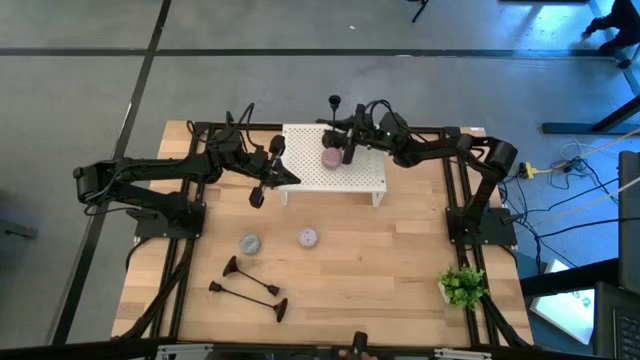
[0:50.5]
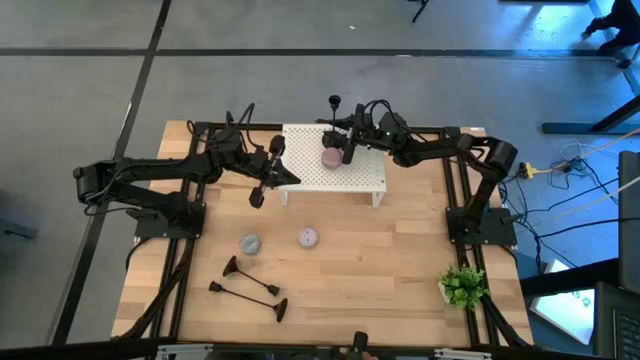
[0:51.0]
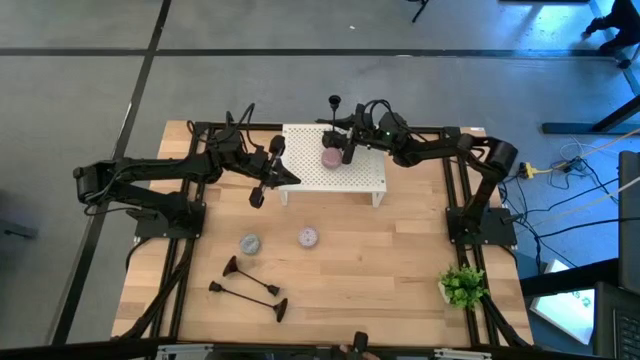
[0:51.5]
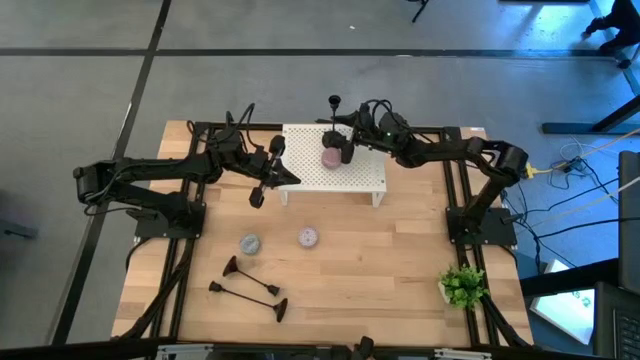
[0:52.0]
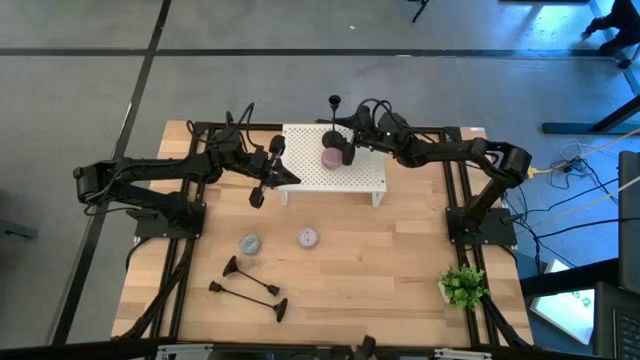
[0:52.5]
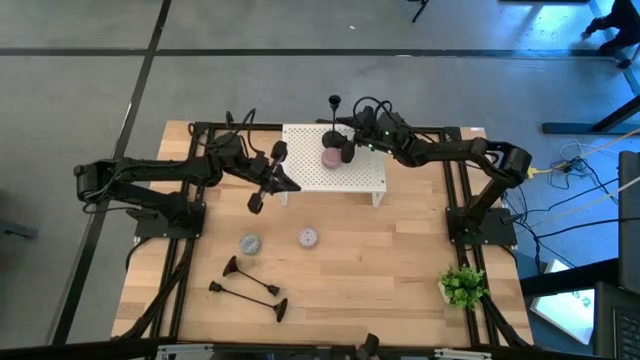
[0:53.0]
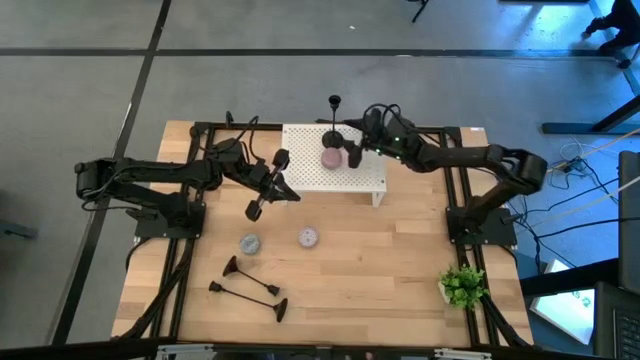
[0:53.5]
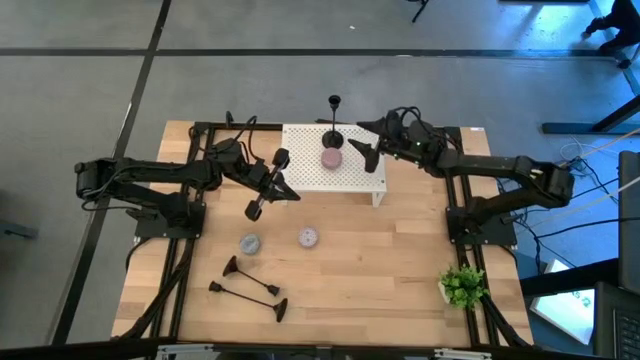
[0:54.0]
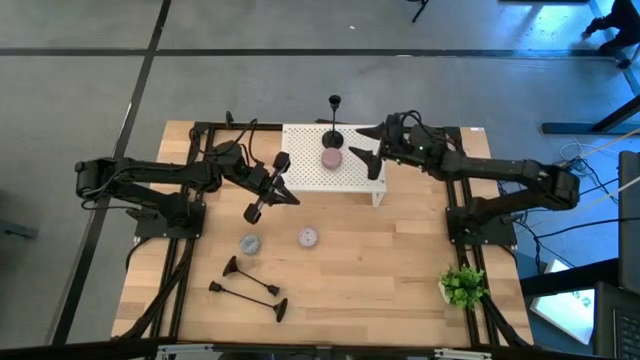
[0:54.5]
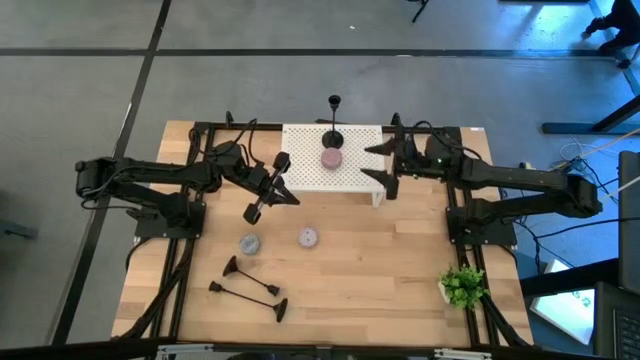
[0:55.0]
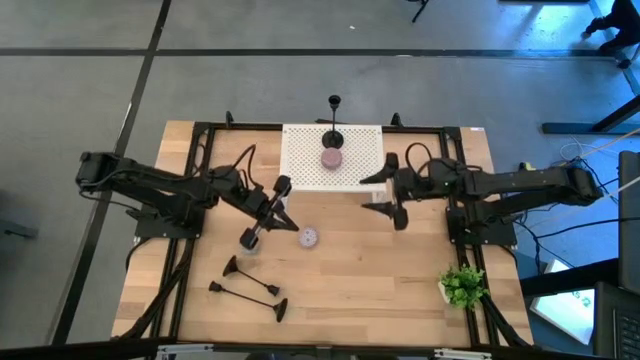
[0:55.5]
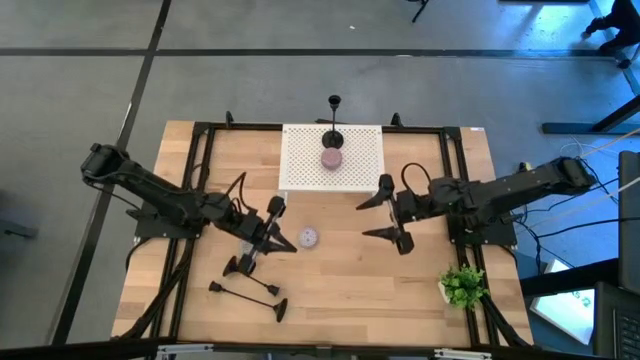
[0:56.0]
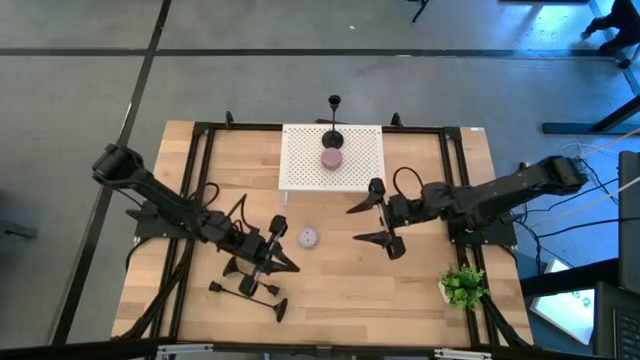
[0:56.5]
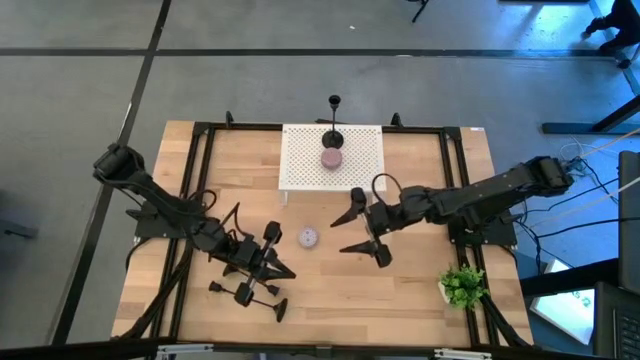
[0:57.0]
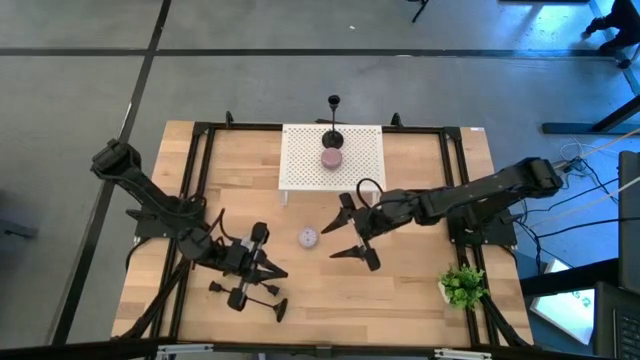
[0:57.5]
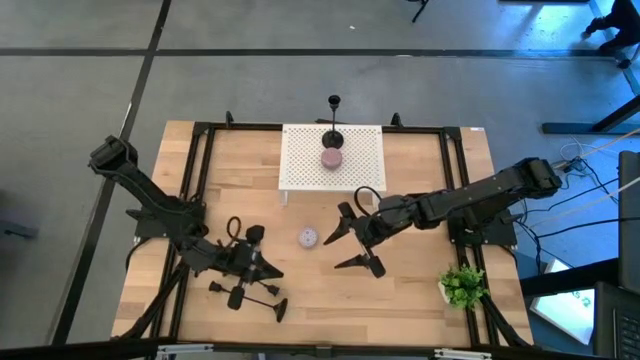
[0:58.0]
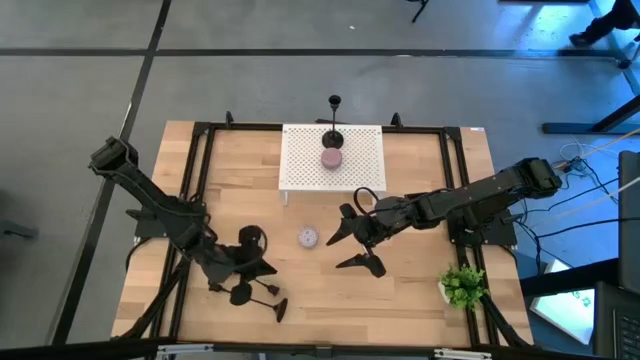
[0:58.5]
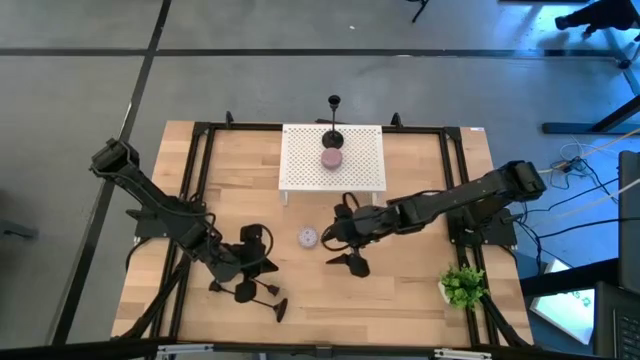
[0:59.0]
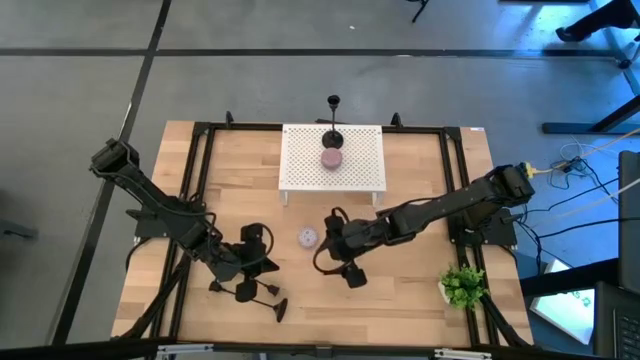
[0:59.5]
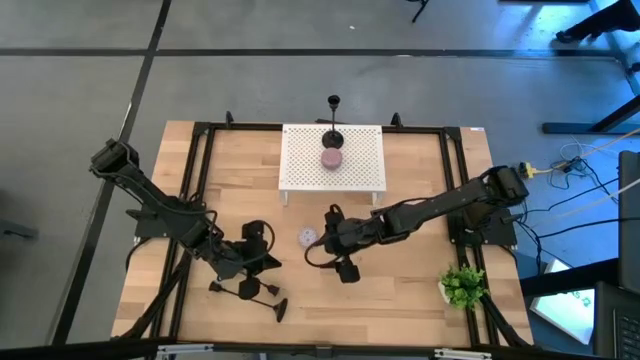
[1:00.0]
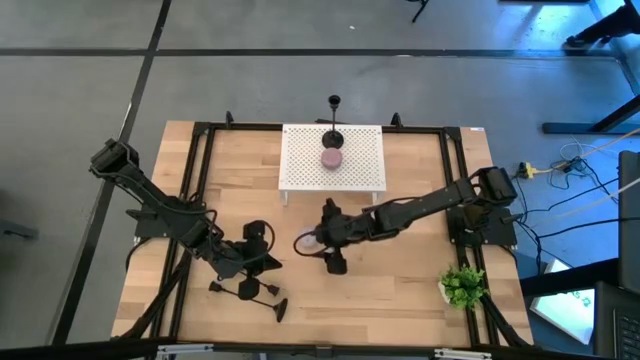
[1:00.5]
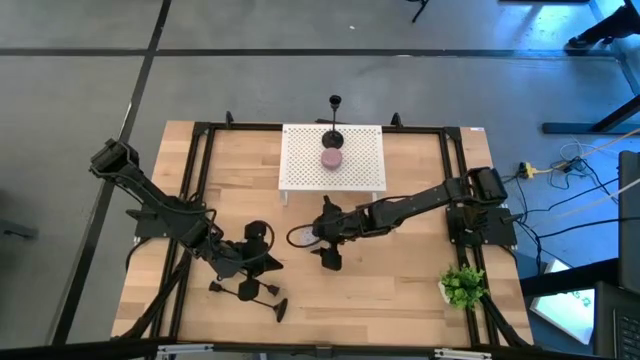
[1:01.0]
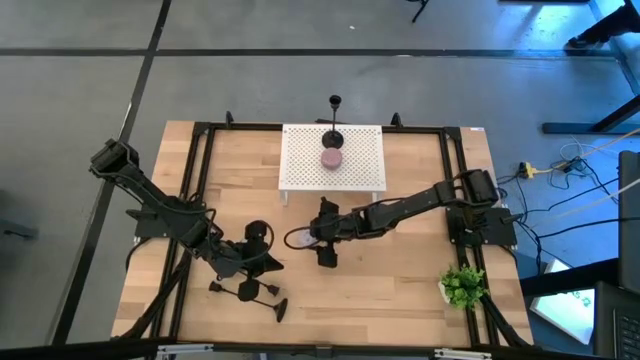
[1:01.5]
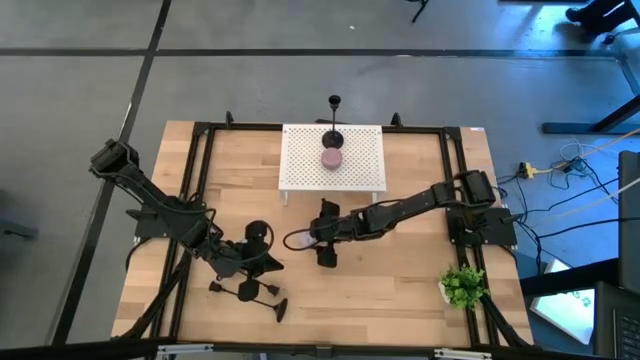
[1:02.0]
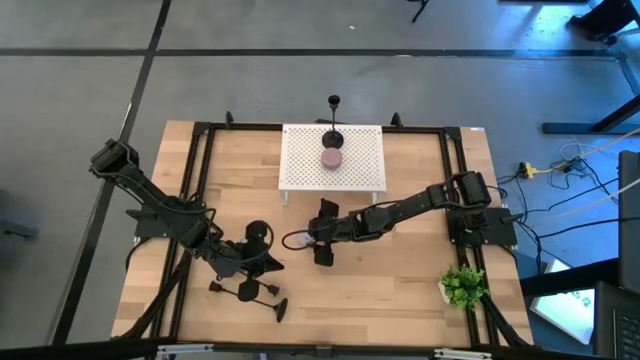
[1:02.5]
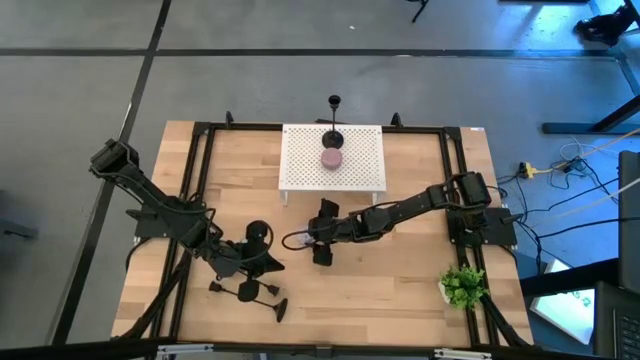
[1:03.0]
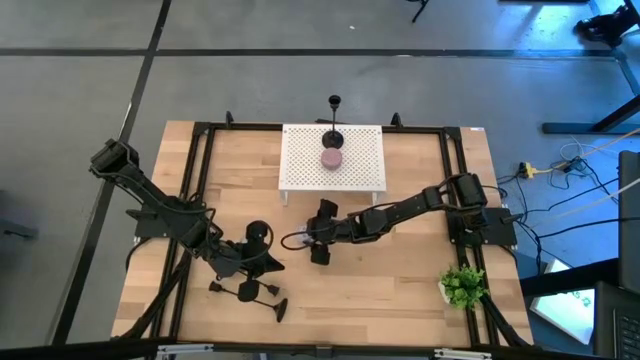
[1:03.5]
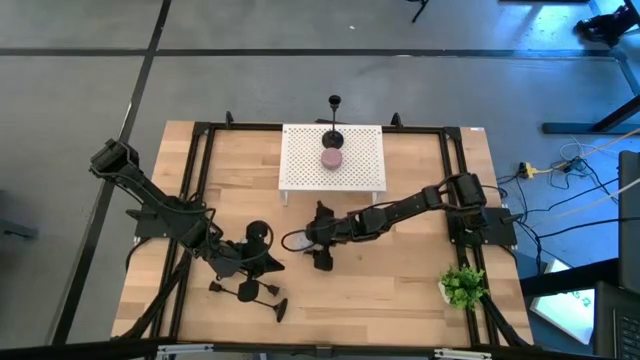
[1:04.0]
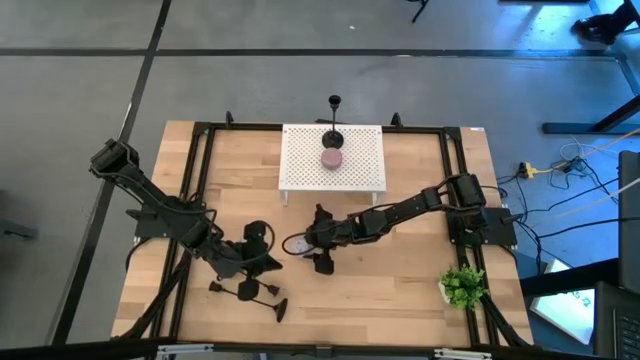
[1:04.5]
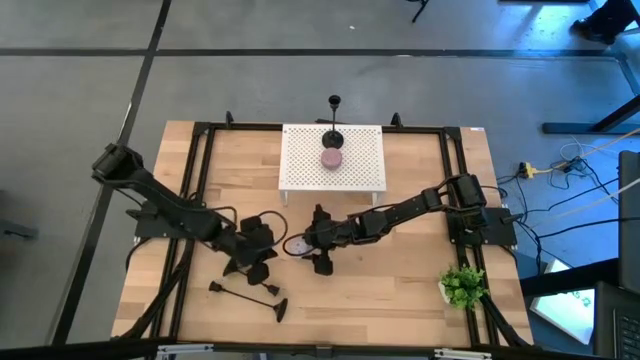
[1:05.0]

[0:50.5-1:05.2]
Task: Pick & Place candle stick holders
Put the white scented candle on the shelf

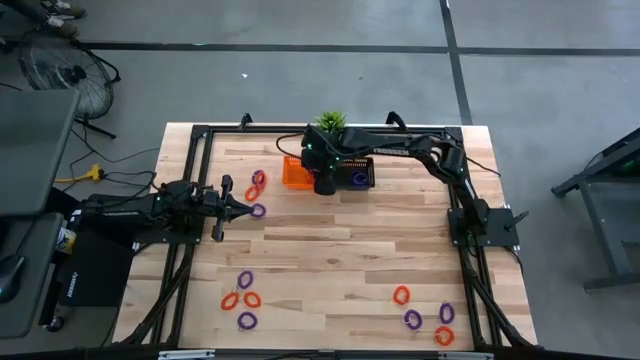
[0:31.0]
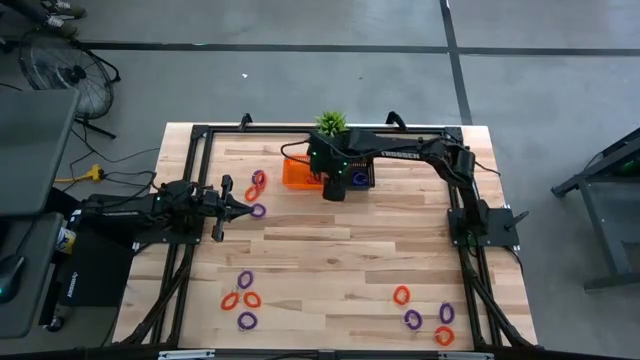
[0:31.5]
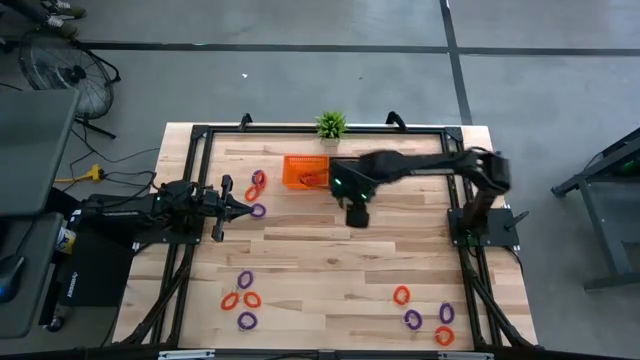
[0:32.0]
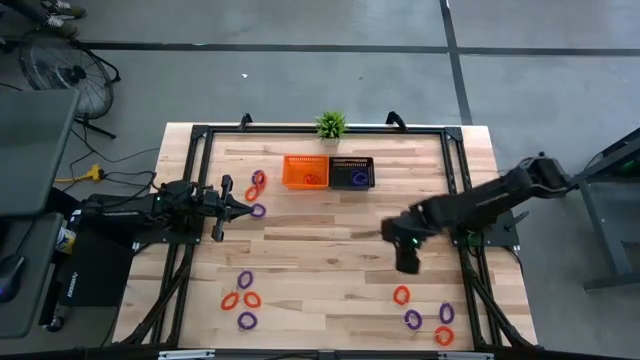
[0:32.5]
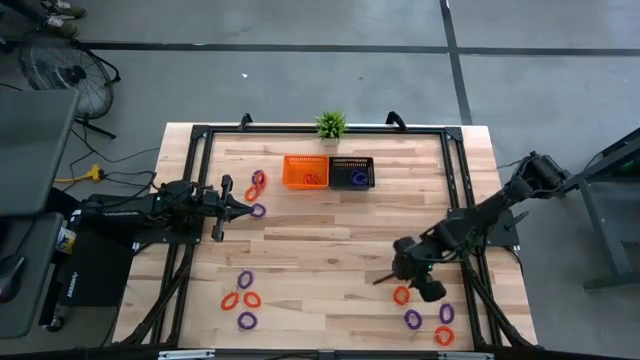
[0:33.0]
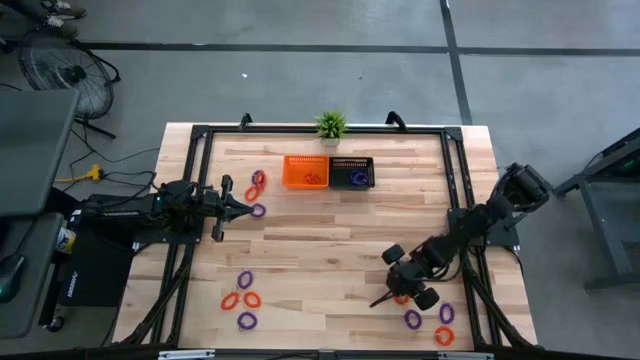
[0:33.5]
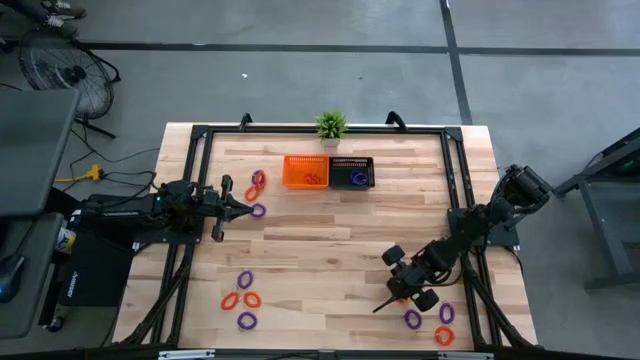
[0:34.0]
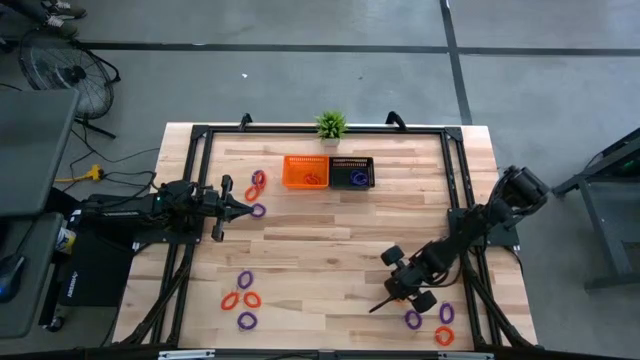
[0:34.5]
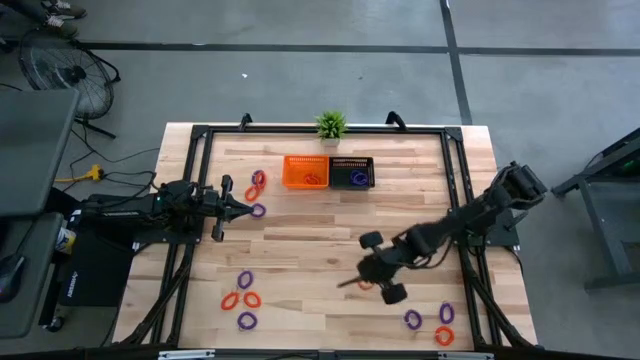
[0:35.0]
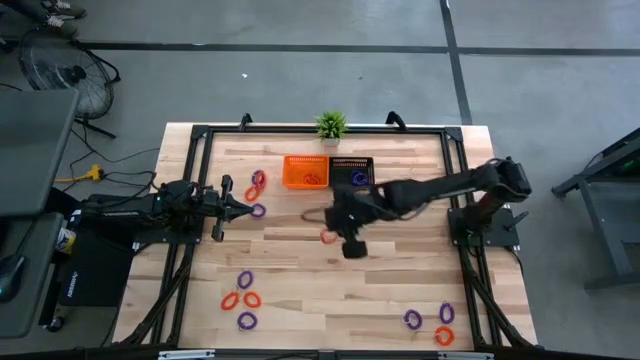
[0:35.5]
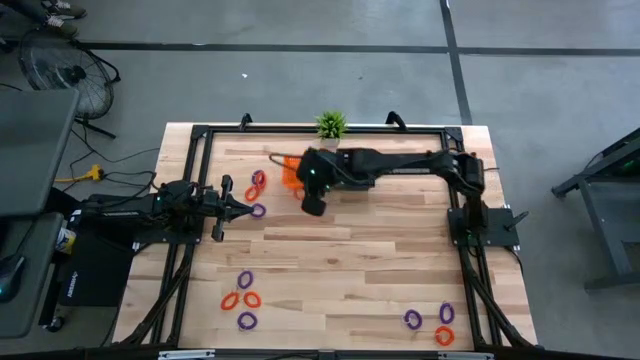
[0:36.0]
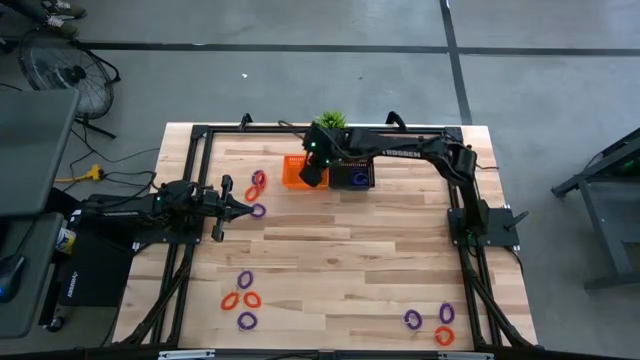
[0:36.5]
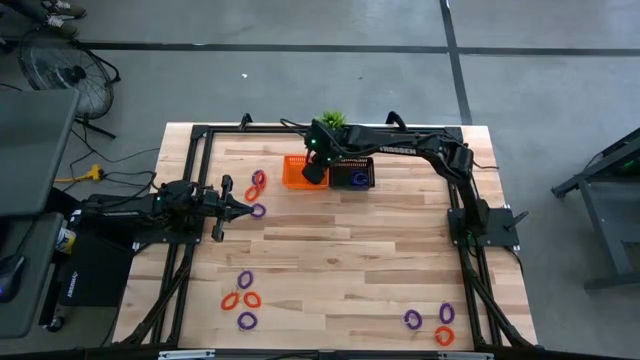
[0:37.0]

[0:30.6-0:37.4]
Task: Sort spring keychains into baskets
Put the orange spring keychain into the orange basket
